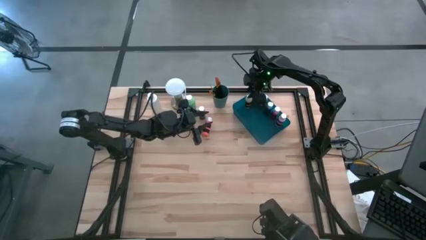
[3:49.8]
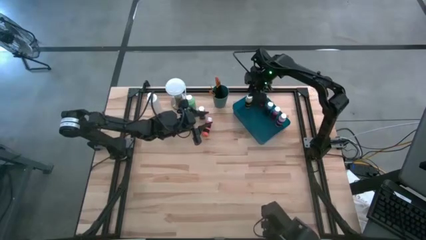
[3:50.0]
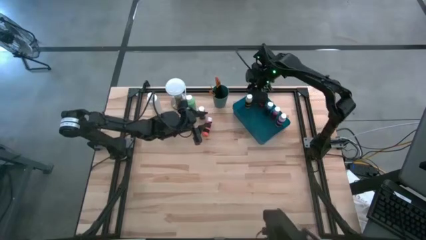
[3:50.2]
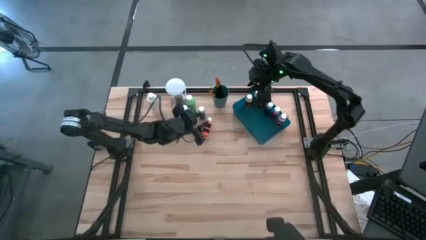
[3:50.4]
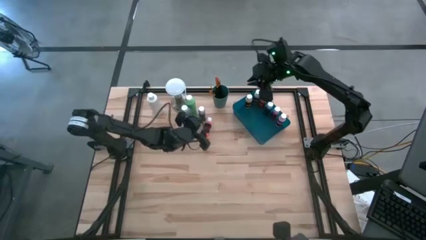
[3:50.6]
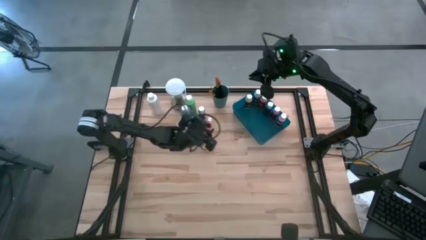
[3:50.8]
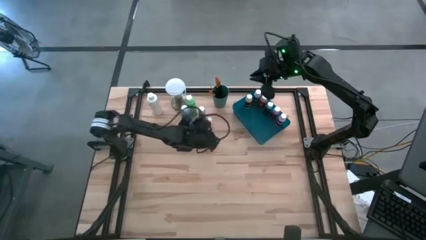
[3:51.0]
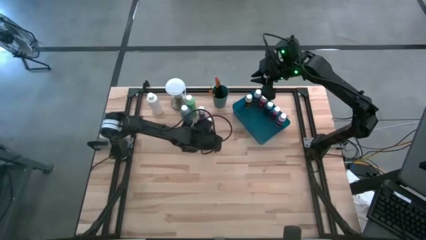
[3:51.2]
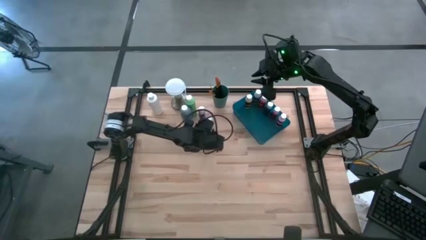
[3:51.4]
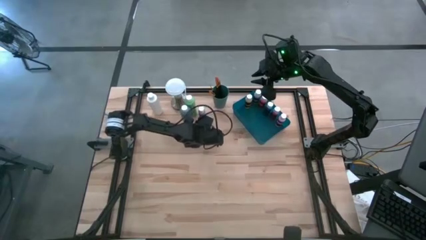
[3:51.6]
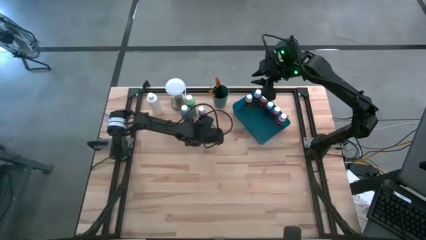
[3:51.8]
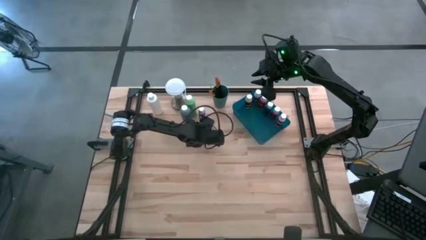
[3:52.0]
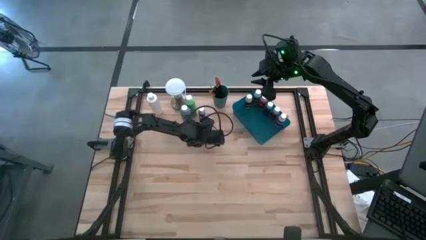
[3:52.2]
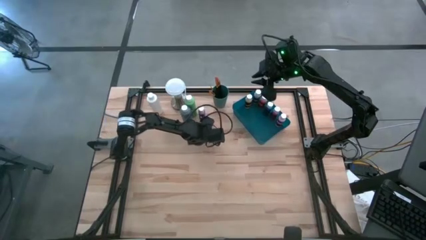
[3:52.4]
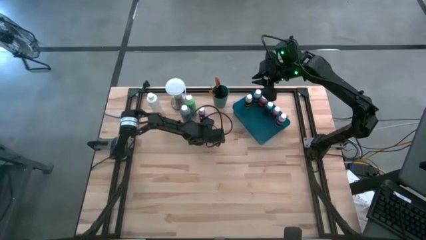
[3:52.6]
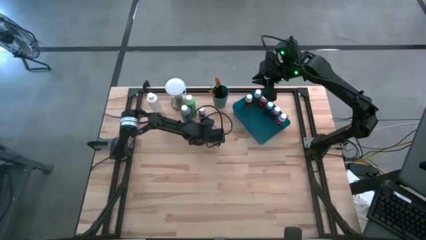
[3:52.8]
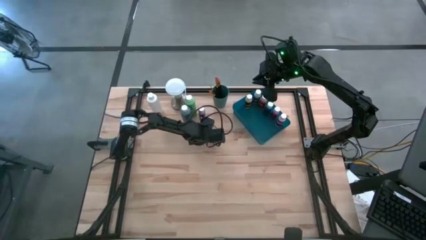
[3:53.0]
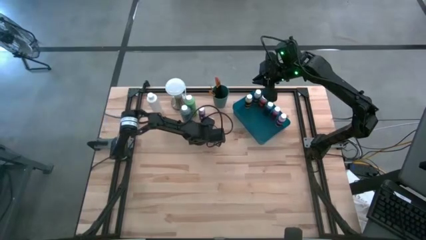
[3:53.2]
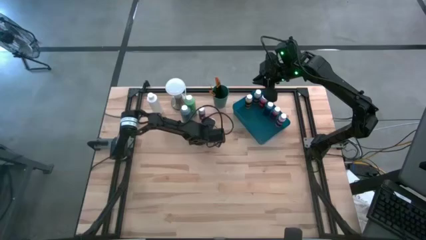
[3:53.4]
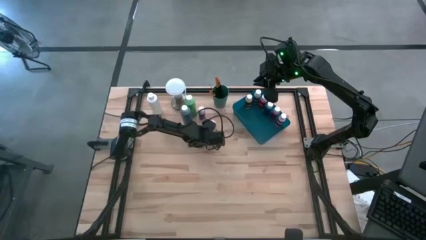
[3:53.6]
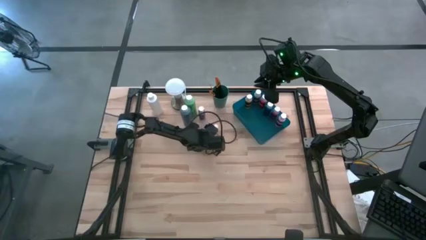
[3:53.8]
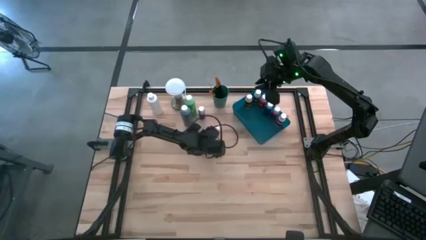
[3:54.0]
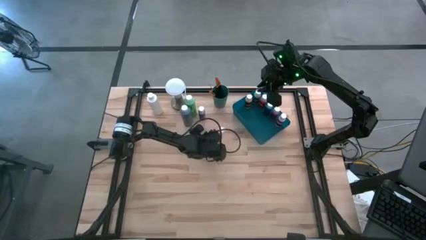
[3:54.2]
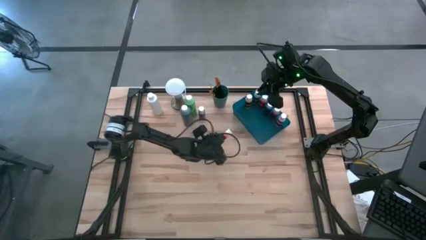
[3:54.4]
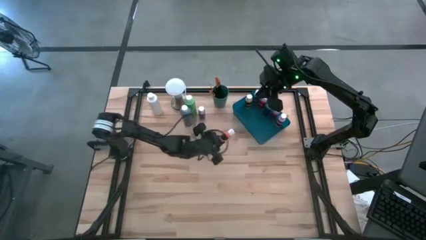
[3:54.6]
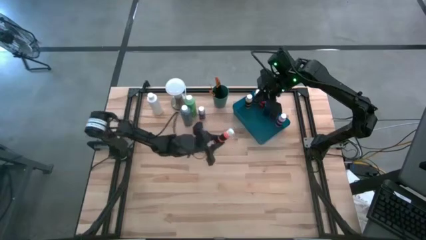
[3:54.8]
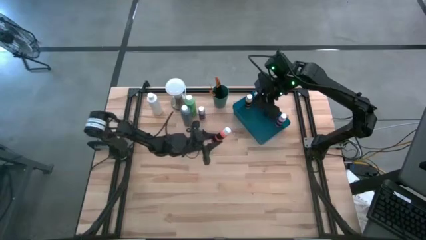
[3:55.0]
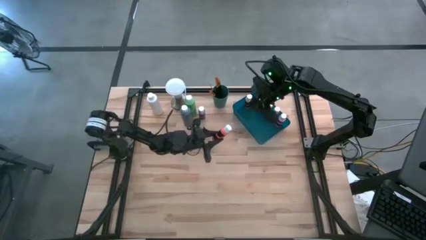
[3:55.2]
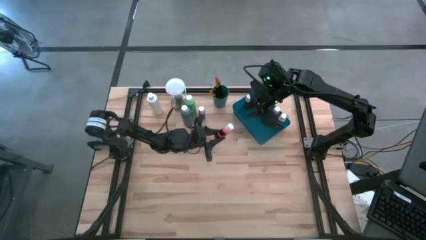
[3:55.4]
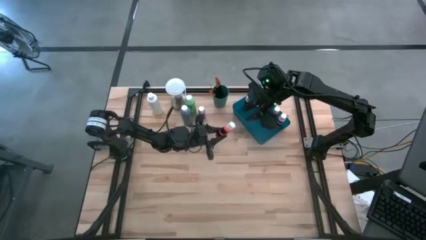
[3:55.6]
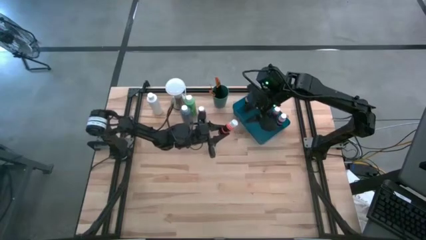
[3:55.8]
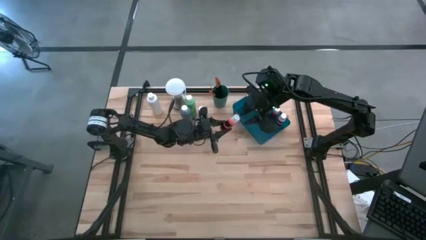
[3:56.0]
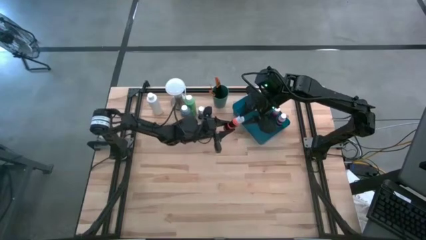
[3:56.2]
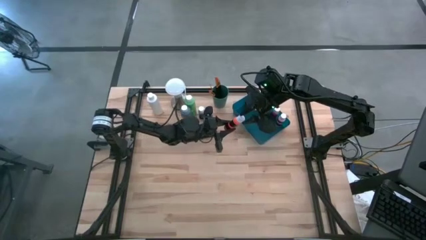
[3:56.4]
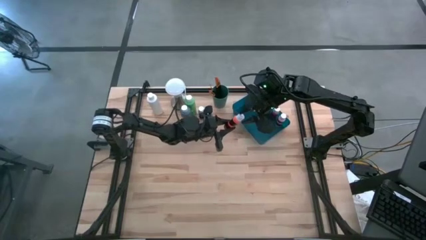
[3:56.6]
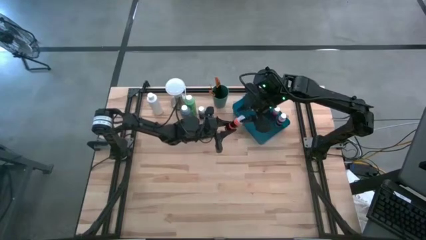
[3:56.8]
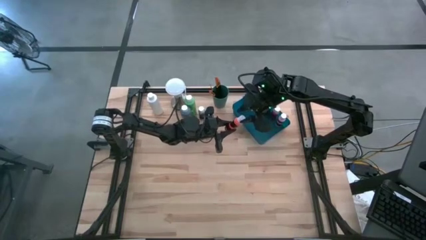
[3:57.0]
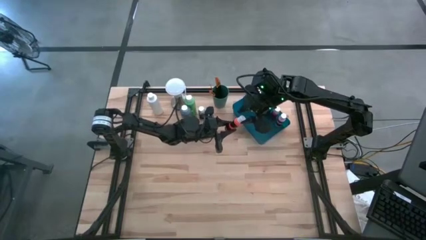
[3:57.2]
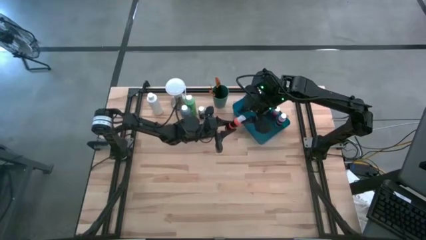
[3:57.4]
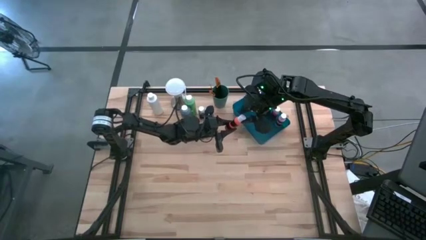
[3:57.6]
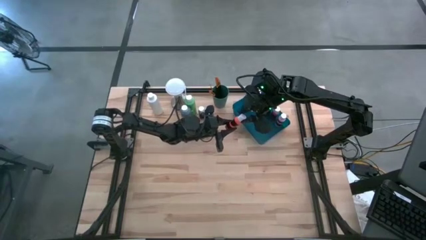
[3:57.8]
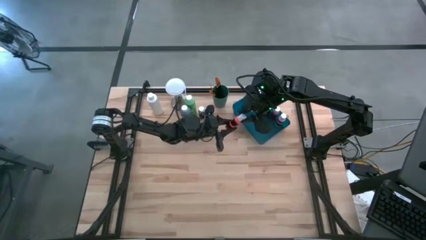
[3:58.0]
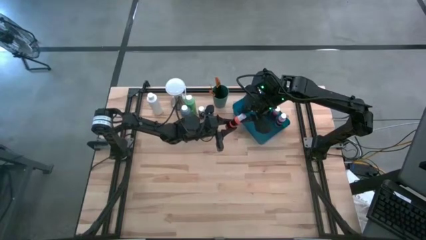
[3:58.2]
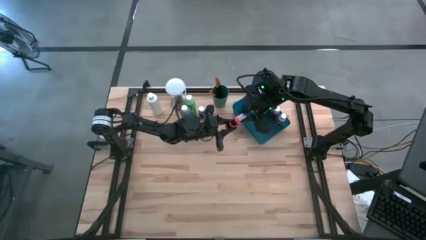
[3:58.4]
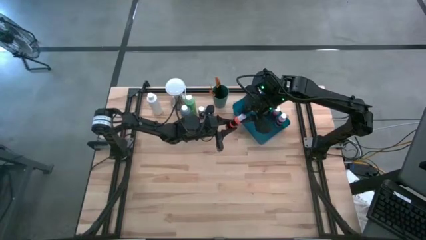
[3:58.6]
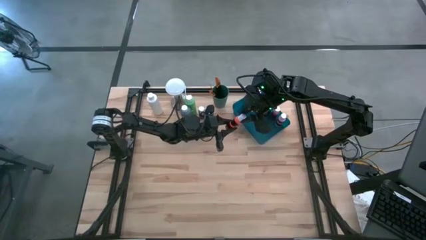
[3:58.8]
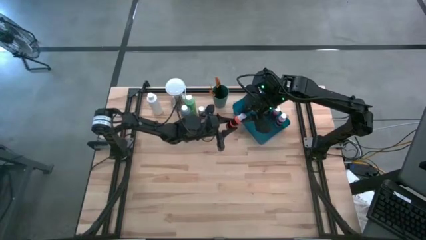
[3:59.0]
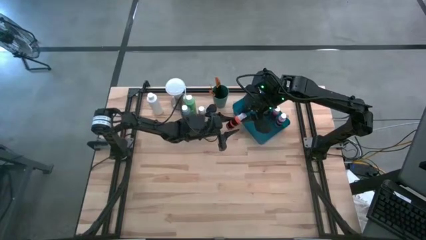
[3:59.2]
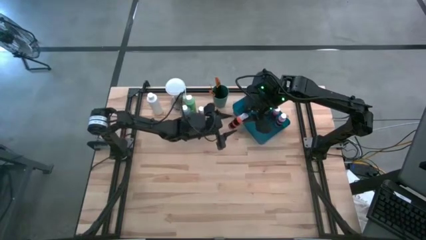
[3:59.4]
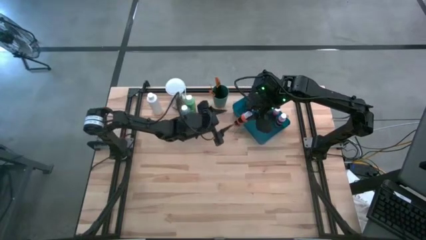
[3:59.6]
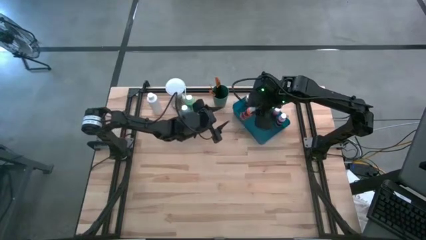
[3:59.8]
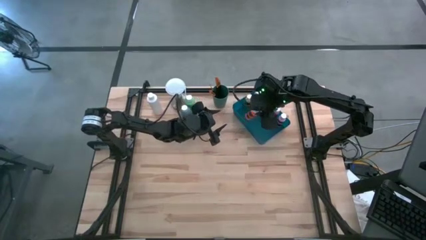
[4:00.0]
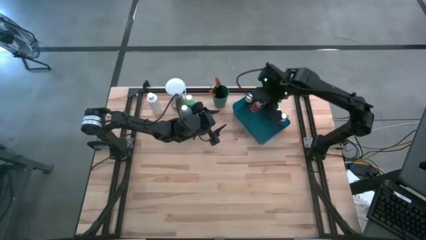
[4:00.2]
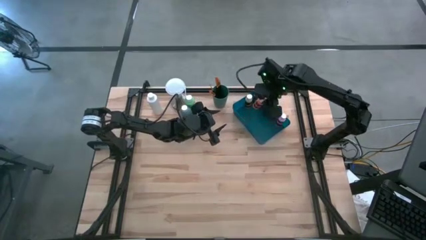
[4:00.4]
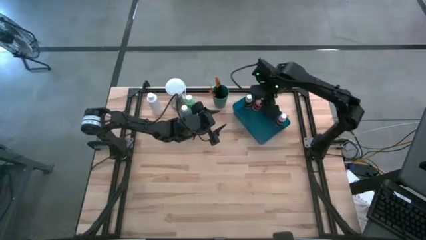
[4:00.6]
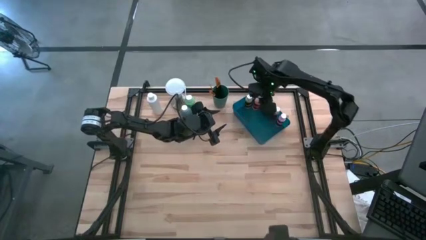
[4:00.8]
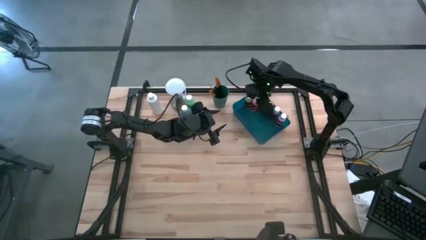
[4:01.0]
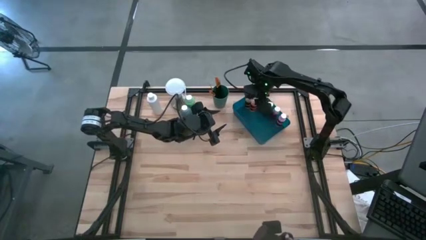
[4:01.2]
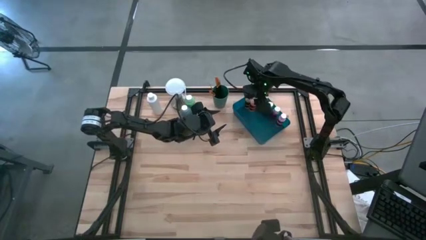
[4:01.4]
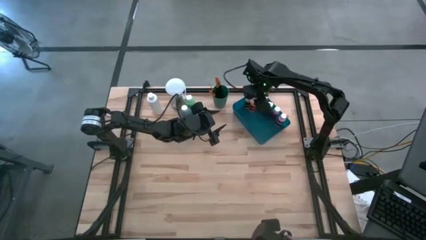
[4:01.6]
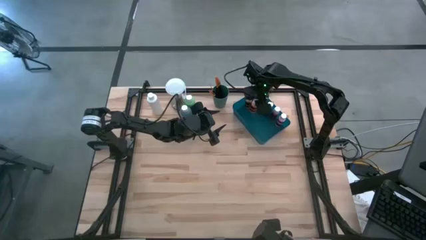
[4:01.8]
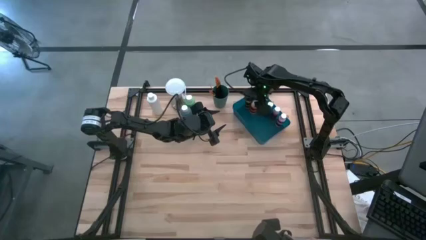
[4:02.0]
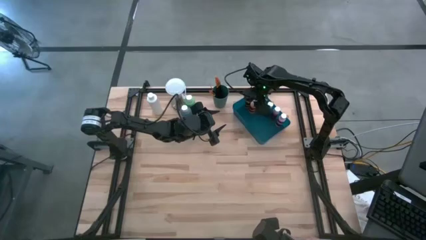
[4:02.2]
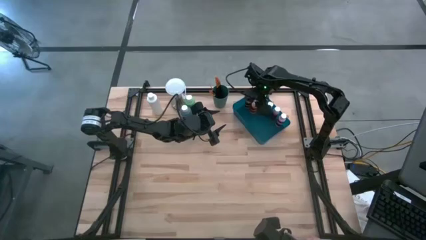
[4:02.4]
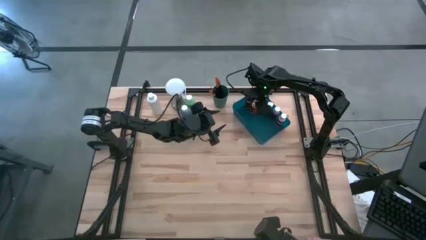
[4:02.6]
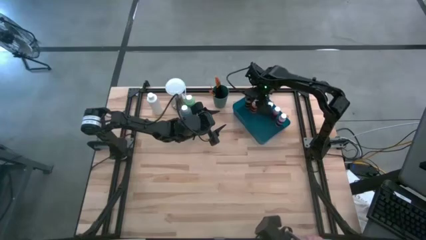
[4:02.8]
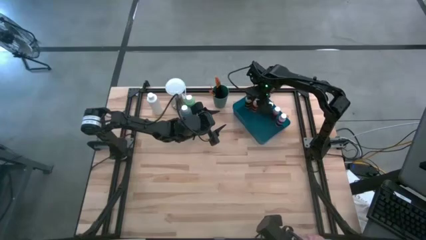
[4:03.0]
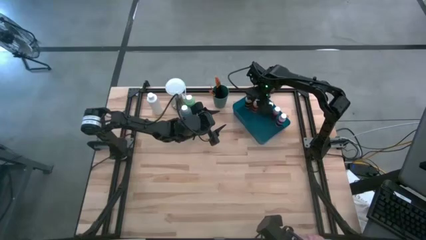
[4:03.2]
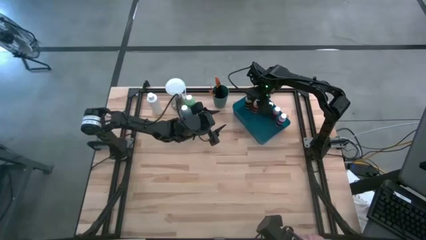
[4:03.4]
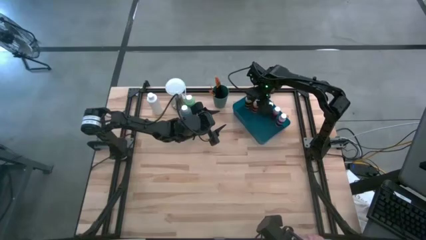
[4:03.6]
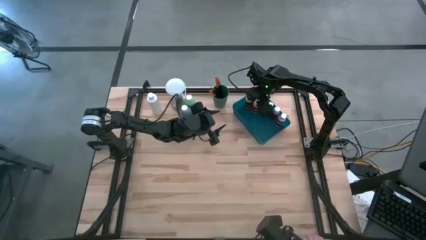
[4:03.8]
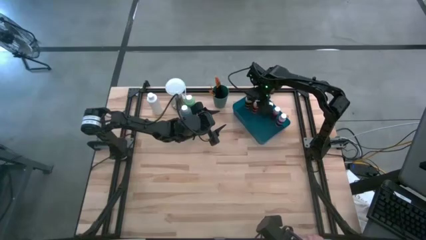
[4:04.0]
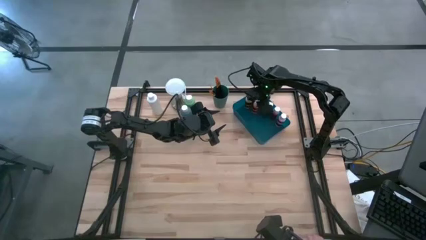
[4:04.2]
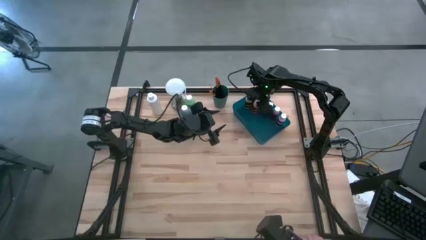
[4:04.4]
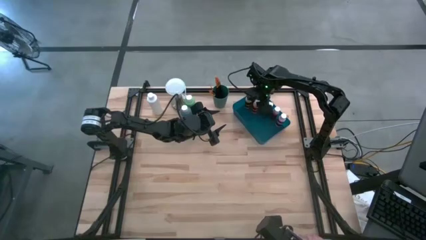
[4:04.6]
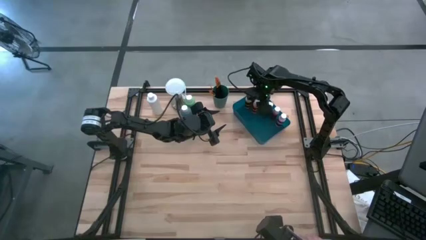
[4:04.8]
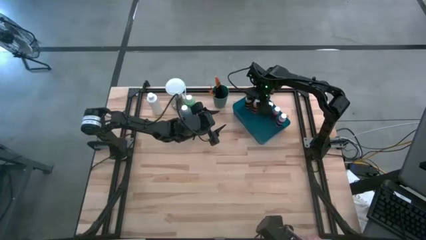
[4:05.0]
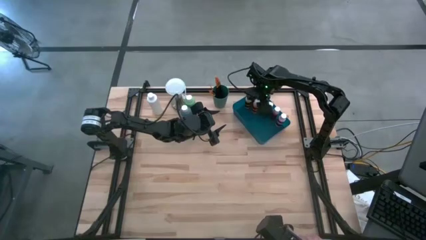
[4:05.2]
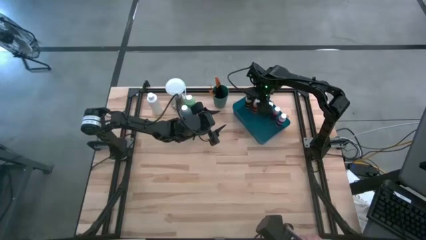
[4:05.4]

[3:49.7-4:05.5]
Task: Pick & Place Paint Supplies
Put the orange paint bottle into the blue bin
